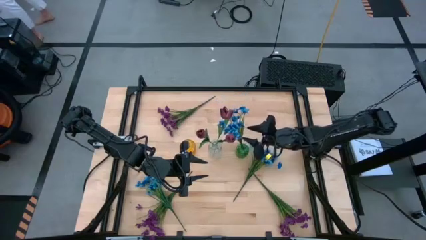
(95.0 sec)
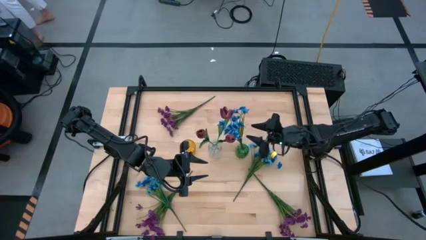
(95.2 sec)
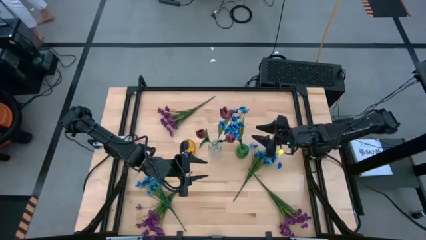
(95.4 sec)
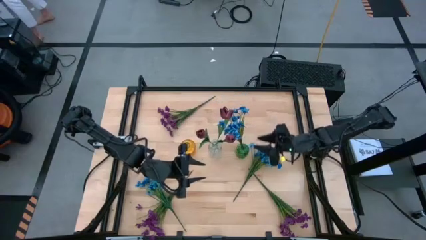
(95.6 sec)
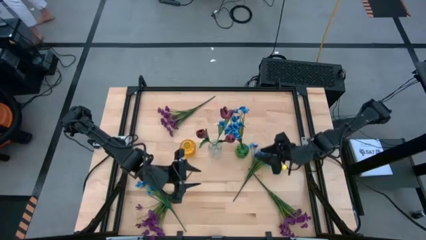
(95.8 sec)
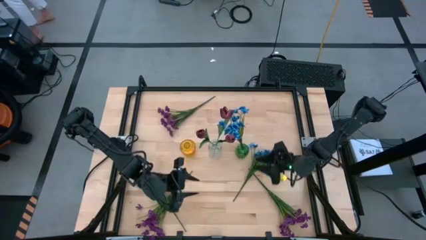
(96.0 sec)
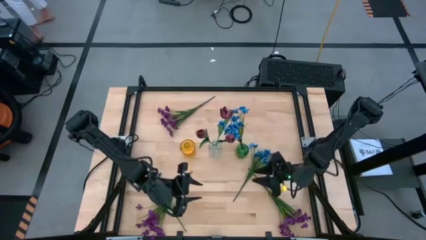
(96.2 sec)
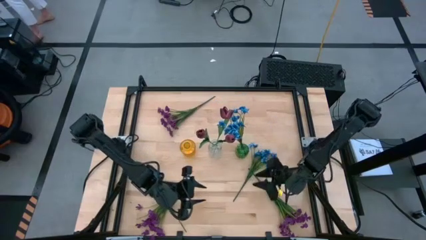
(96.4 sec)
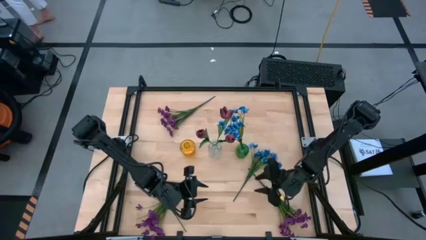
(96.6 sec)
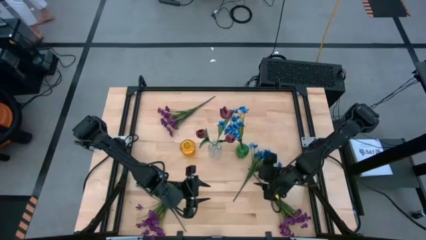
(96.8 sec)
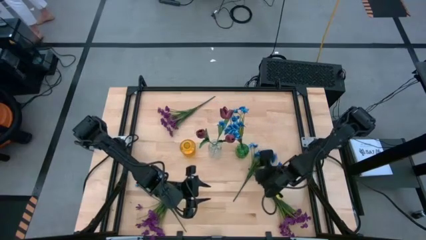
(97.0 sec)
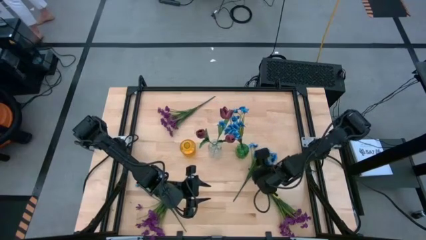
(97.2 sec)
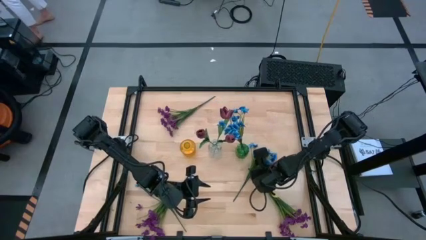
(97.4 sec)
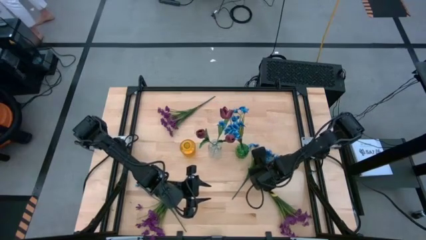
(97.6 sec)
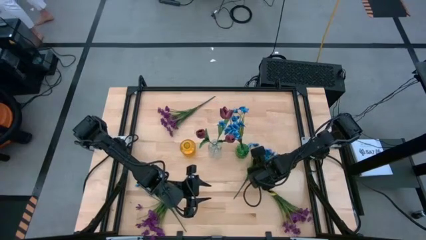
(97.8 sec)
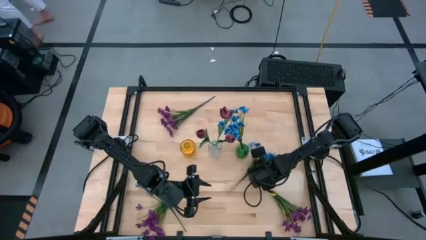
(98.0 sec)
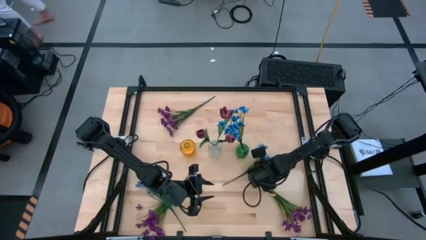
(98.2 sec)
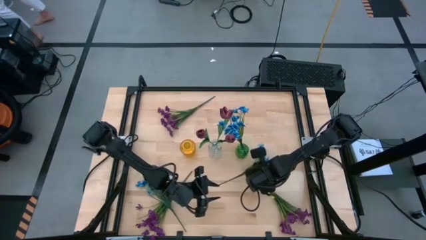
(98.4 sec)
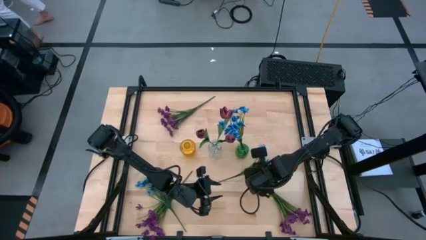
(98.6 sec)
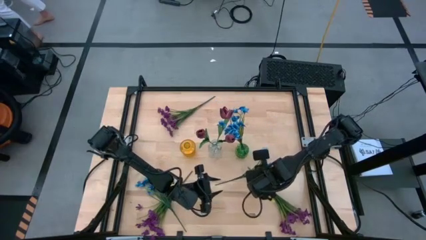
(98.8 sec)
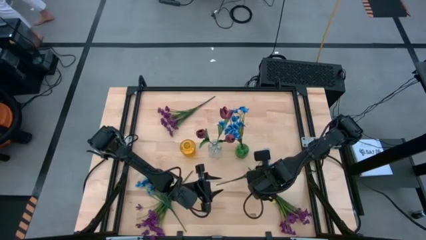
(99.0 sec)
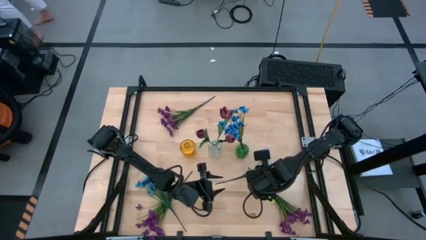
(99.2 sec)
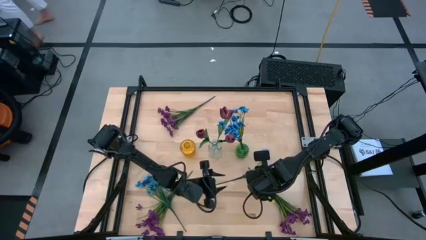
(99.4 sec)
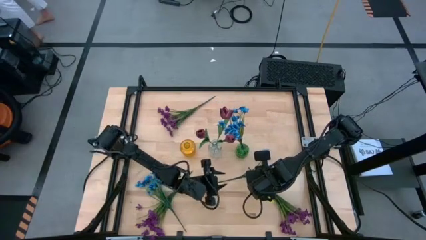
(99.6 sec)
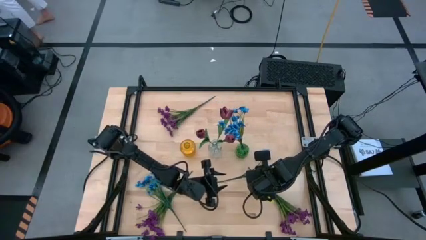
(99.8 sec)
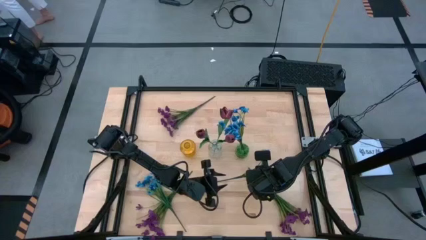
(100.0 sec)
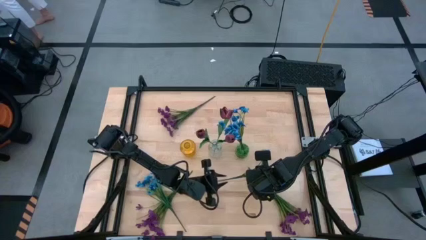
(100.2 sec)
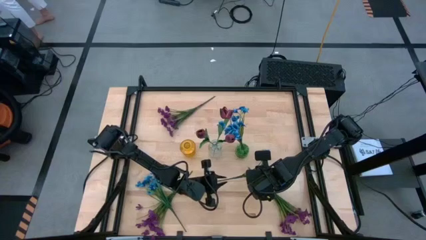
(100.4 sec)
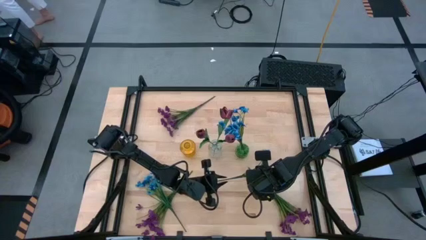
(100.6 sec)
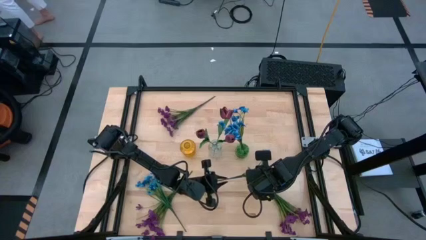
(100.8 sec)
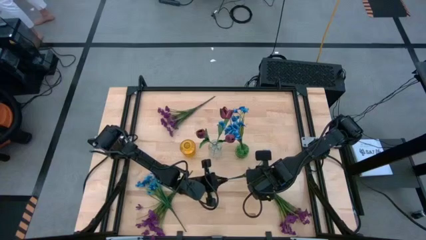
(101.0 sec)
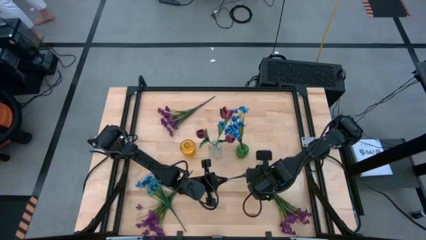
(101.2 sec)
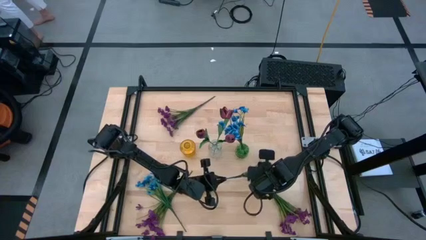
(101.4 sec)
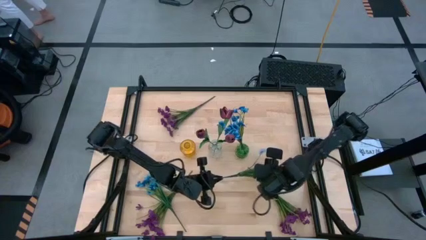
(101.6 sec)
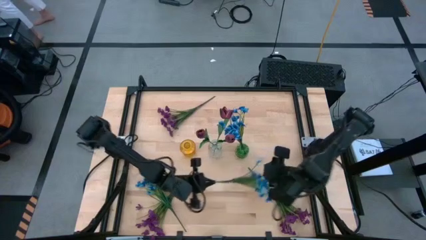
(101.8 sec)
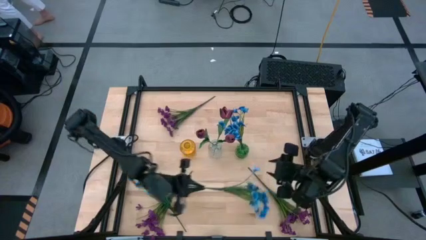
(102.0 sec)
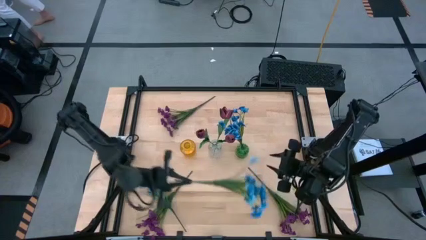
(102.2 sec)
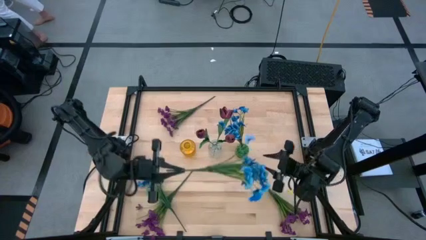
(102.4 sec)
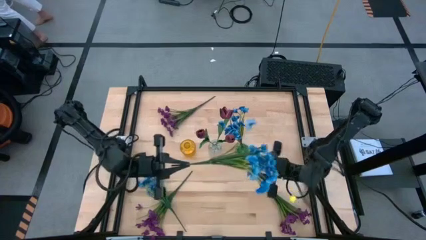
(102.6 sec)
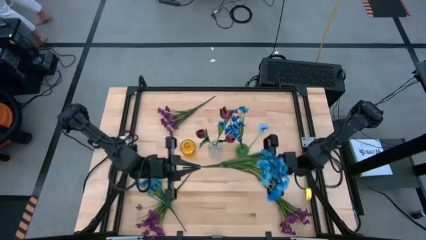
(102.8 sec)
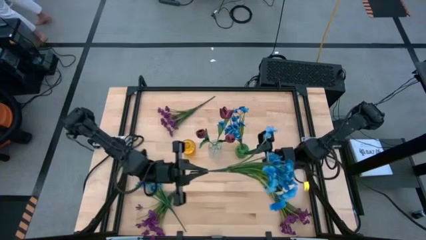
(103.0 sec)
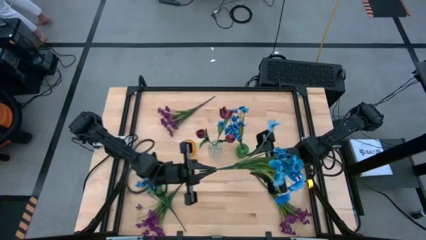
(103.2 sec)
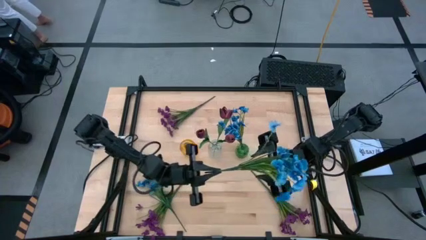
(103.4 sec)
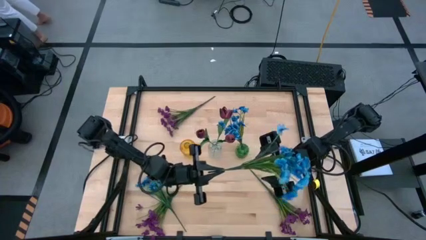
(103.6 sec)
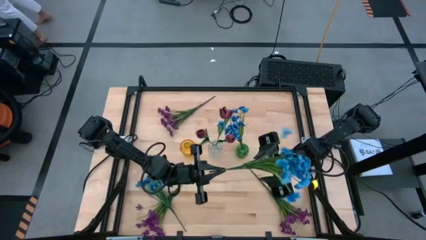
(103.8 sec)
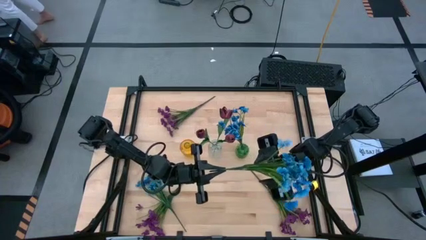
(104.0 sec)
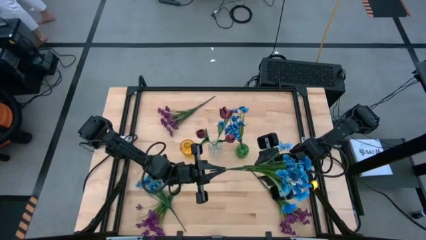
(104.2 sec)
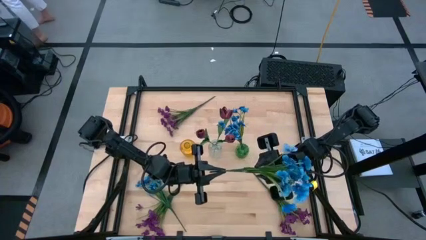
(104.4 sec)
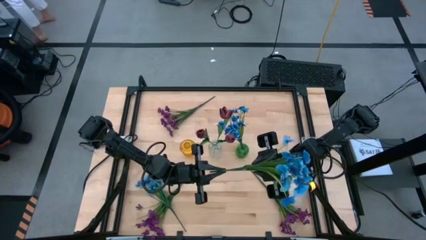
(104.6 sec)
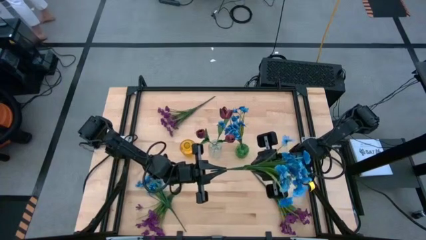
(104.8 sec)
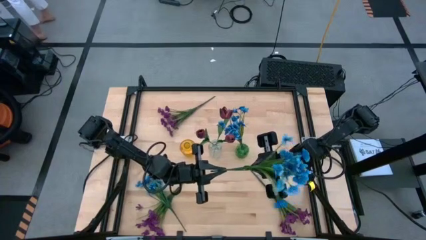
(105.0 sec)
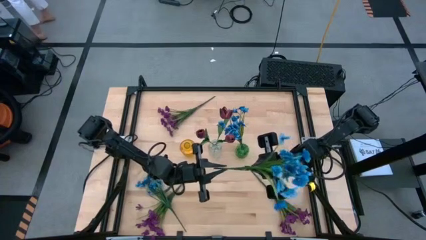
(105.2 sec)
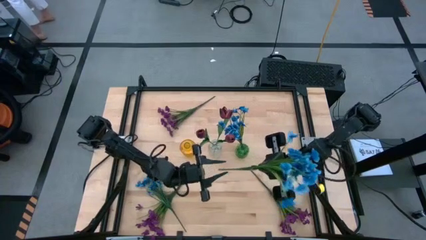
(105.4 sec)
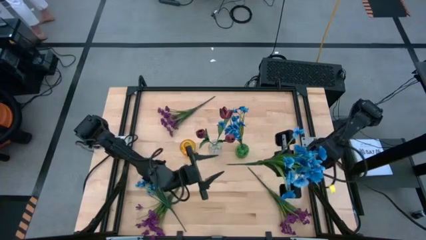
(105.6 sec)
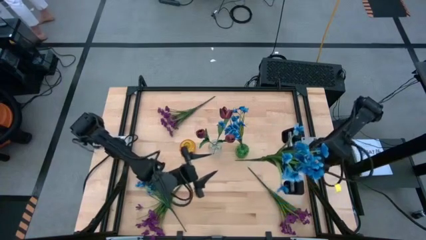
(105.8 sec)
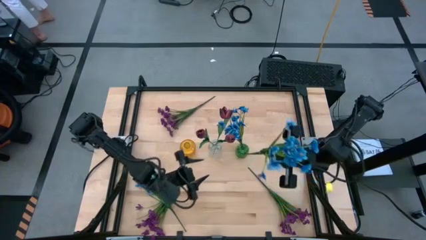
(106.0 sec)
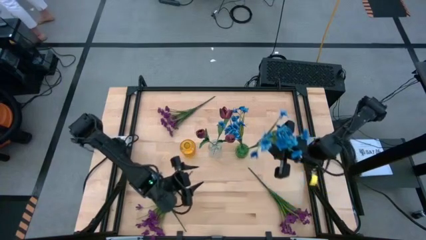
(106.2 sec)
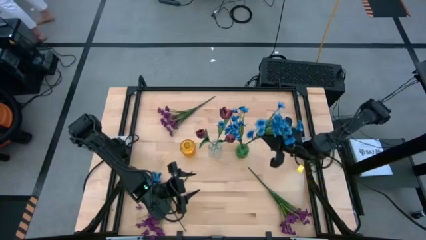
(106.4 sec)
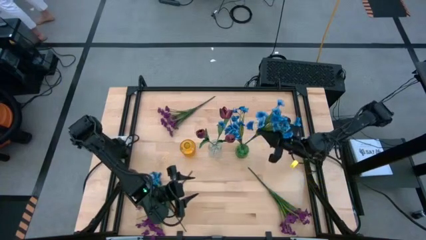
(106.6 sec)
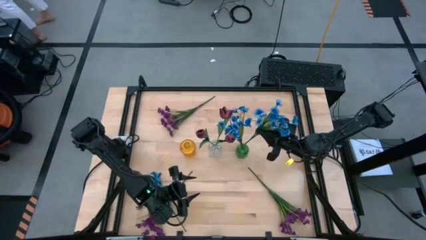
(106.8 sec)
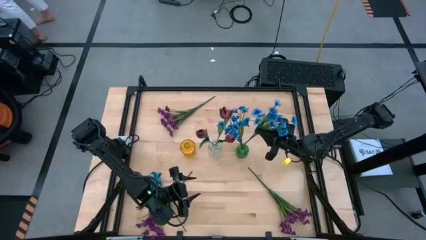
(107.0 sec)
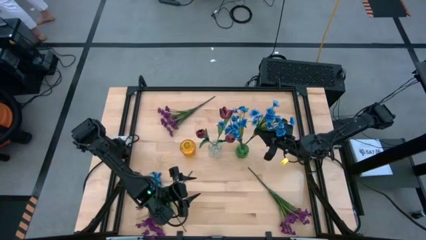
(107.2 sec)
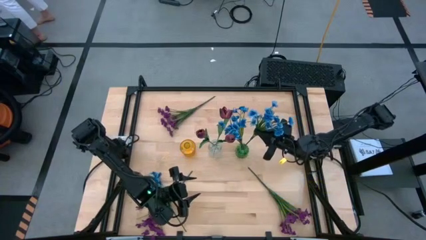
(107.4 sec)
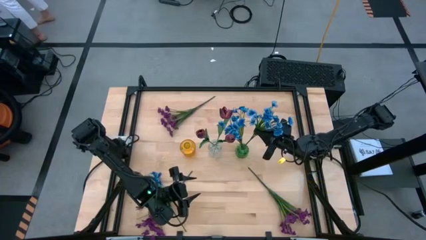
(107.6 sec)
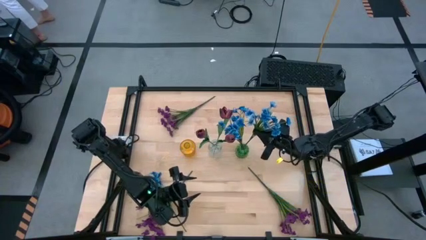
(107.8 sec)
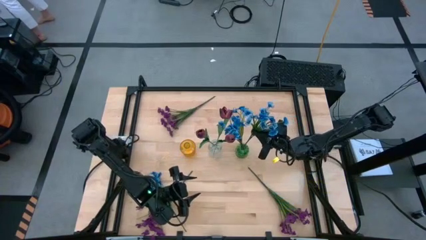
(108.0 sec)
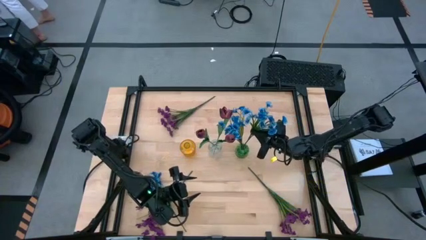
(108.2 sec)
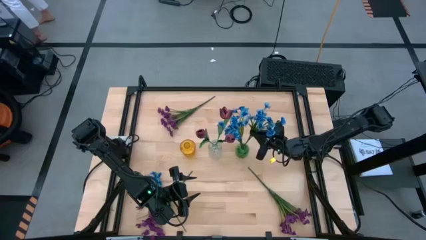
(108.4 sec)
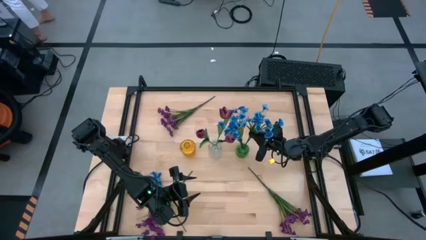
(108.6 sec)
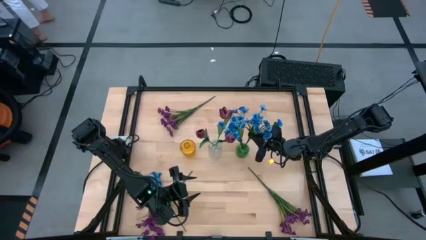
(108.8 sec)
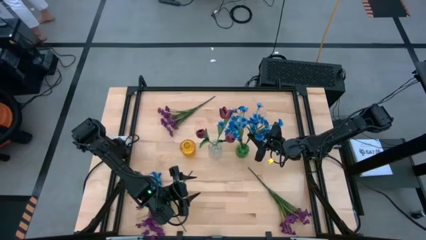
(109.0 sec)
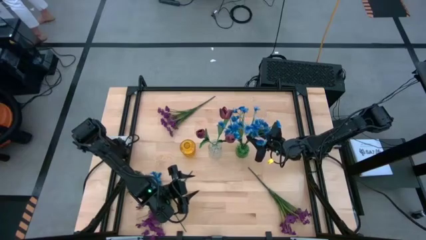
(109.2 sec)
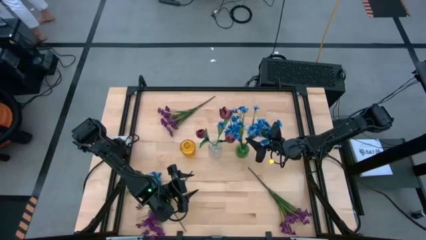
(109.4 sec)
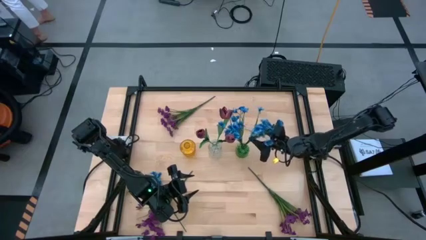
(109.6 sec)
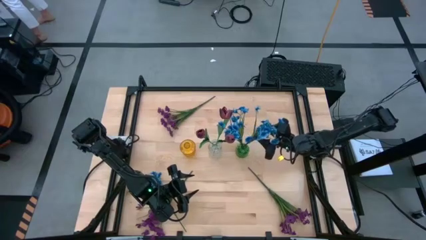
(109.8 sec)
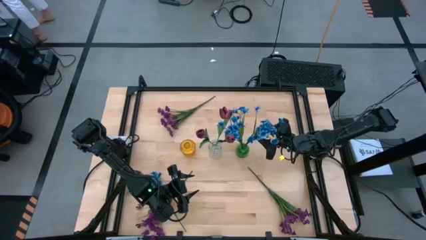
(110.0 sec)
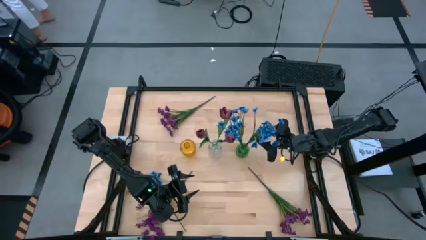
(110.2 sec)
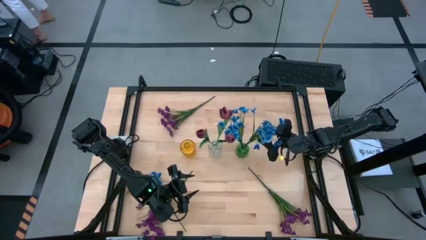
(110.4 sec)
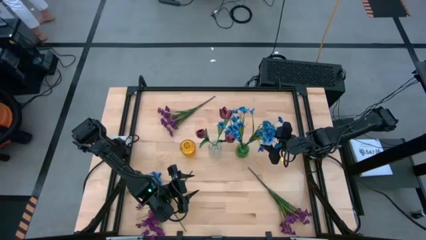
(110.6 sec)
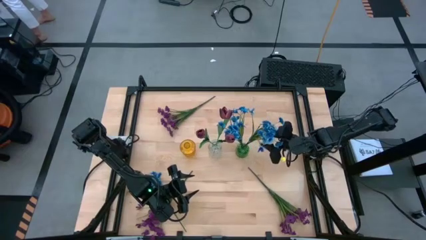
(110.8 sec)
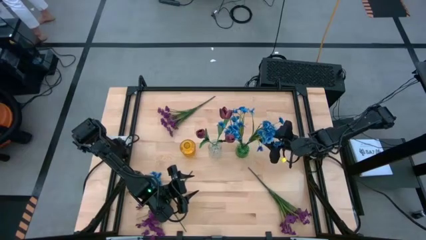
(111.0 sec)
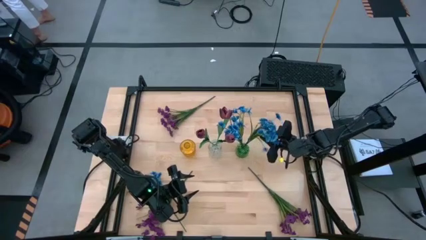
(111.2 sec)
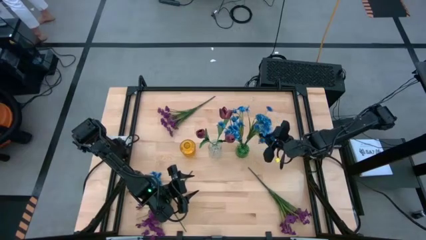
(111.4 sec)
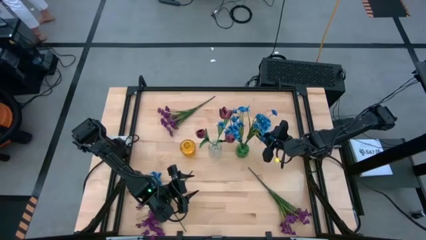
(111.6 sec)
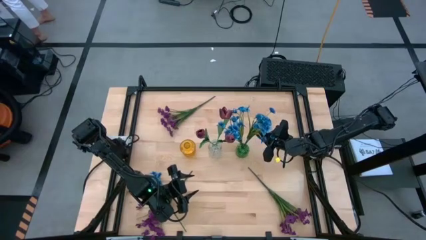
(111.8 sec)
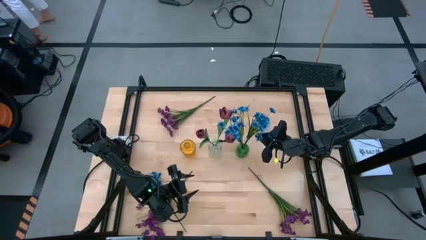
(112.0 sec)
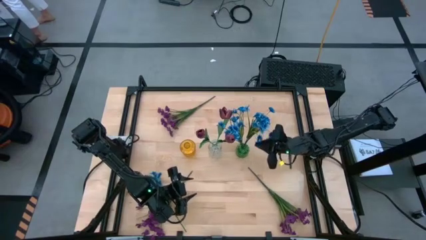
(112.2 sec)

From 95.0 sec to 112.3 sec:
Task: Sort flowers into vase by color
Put the right blue flowers into the green vase
